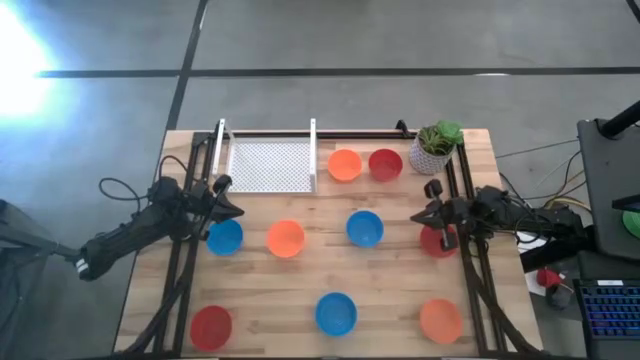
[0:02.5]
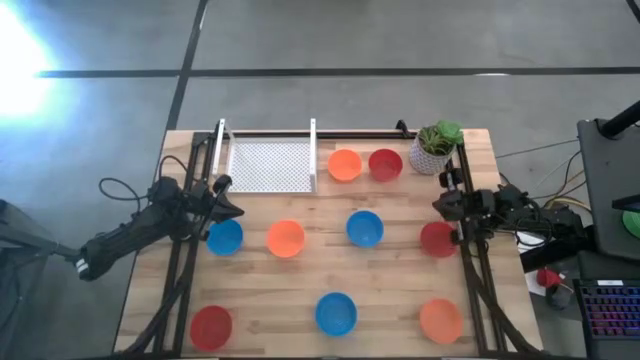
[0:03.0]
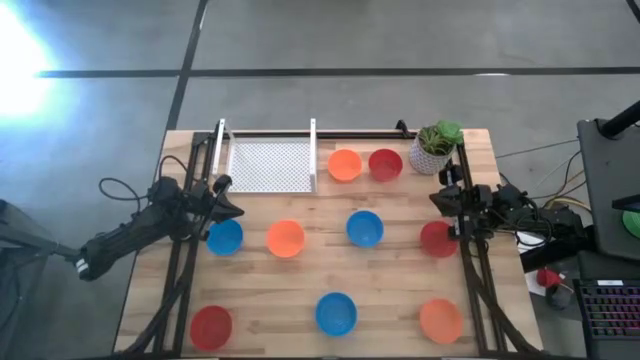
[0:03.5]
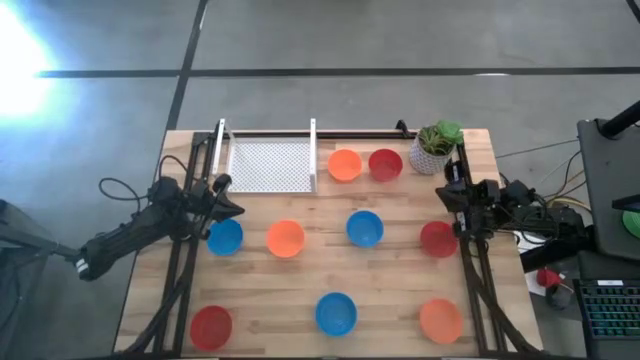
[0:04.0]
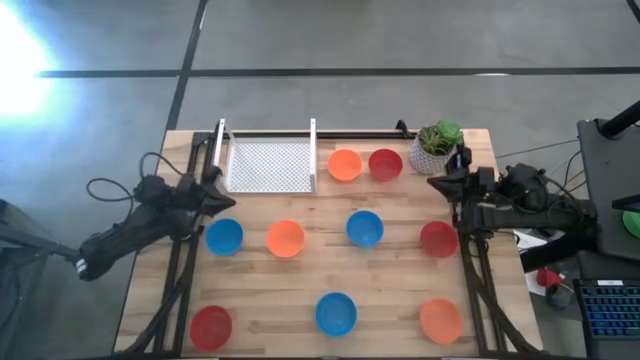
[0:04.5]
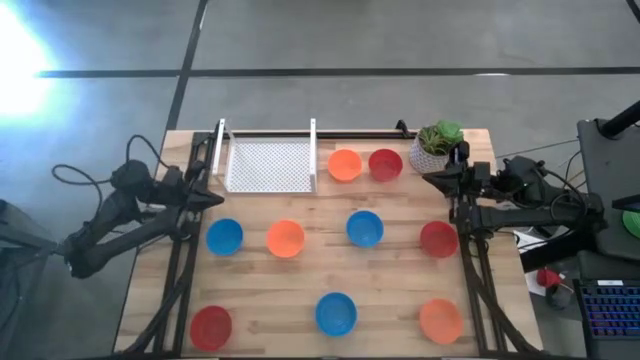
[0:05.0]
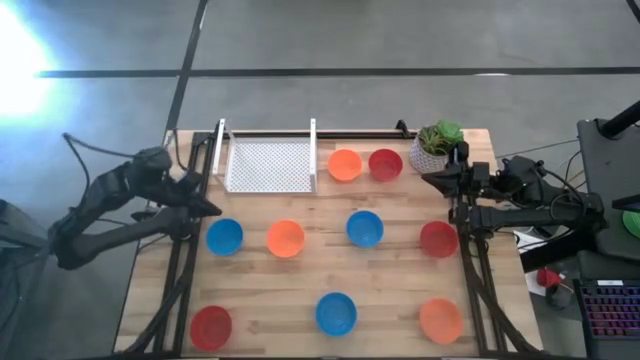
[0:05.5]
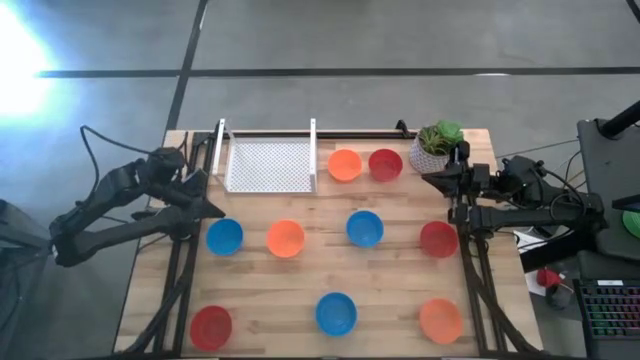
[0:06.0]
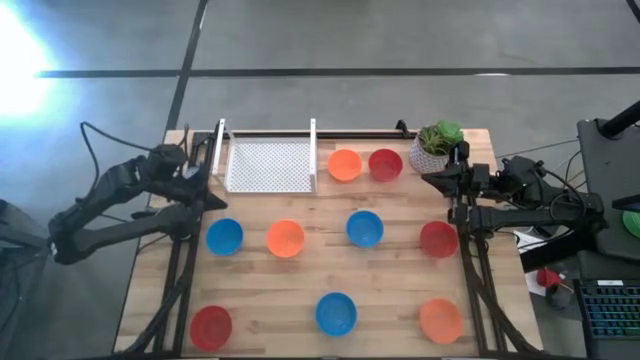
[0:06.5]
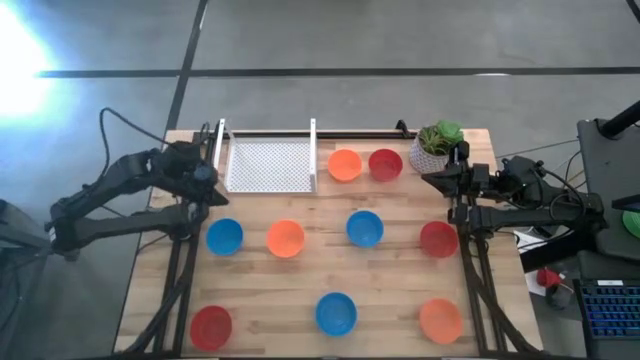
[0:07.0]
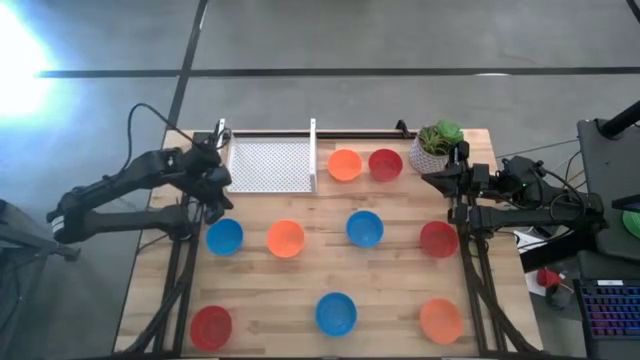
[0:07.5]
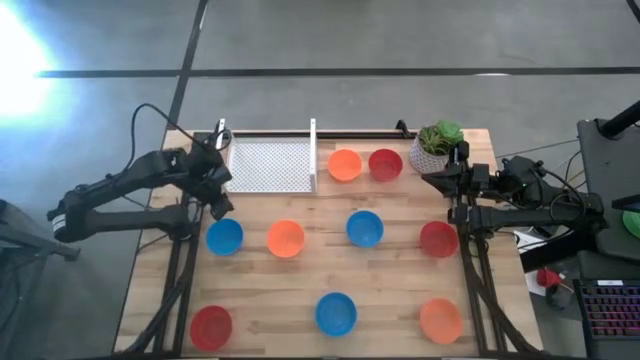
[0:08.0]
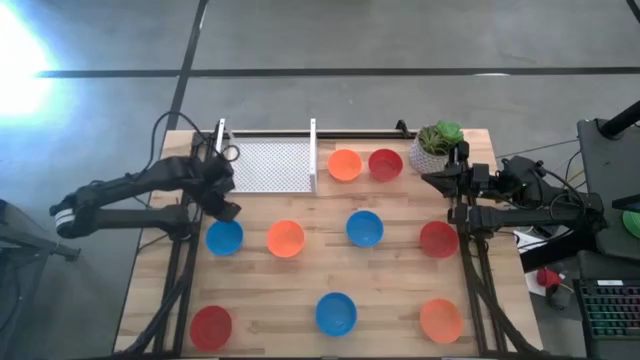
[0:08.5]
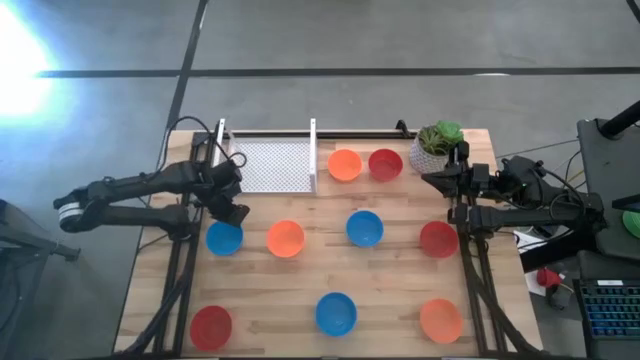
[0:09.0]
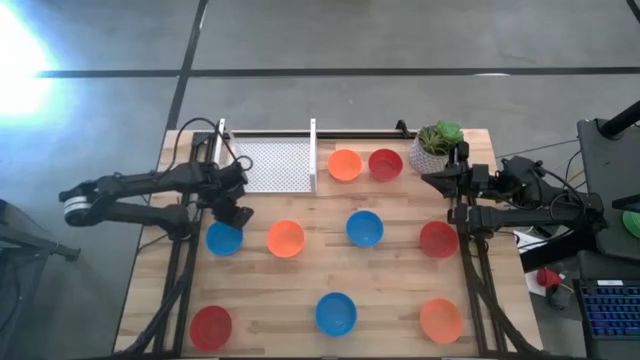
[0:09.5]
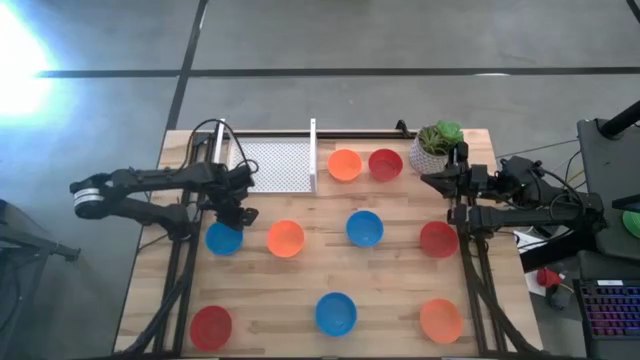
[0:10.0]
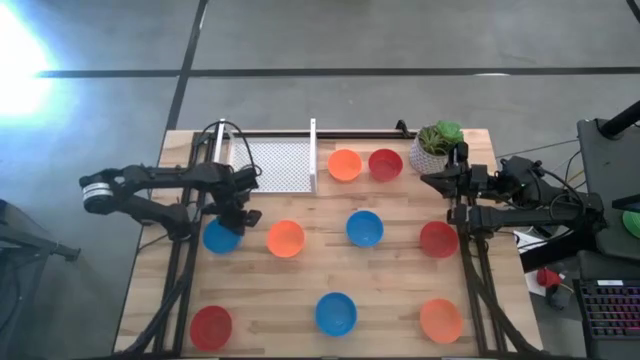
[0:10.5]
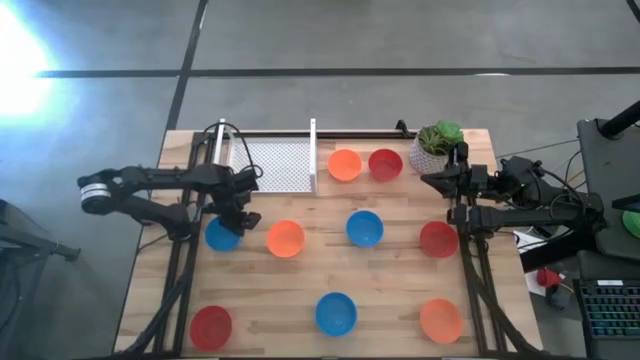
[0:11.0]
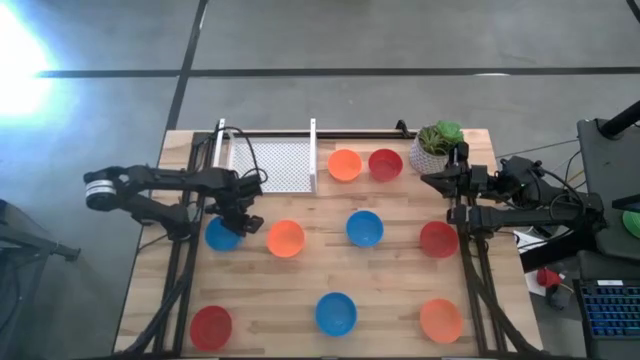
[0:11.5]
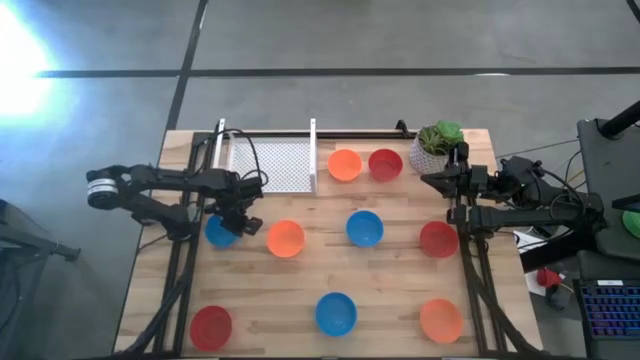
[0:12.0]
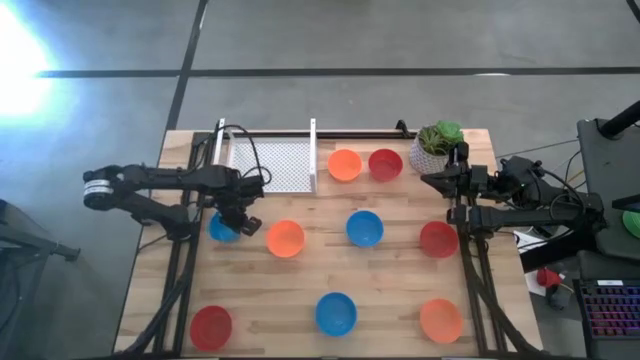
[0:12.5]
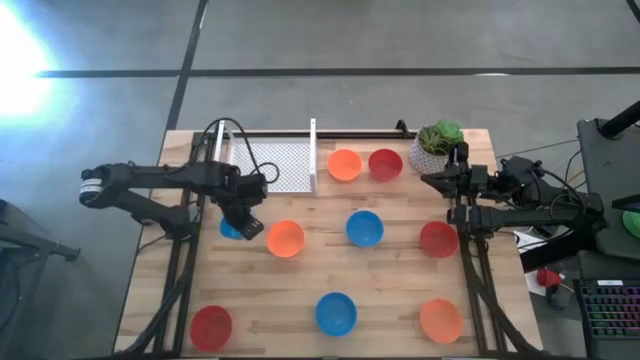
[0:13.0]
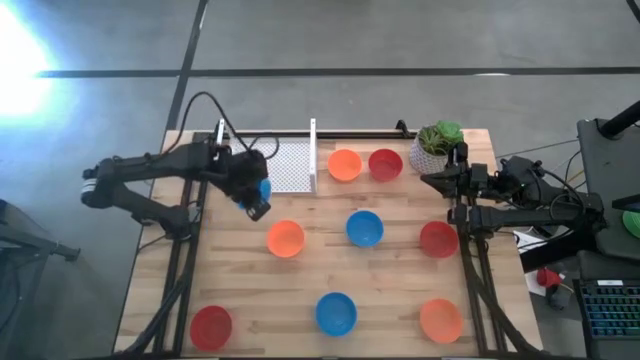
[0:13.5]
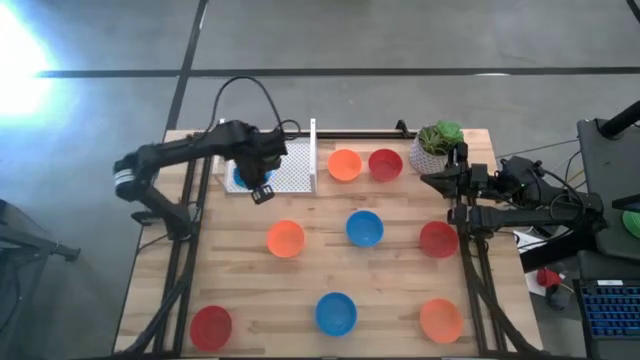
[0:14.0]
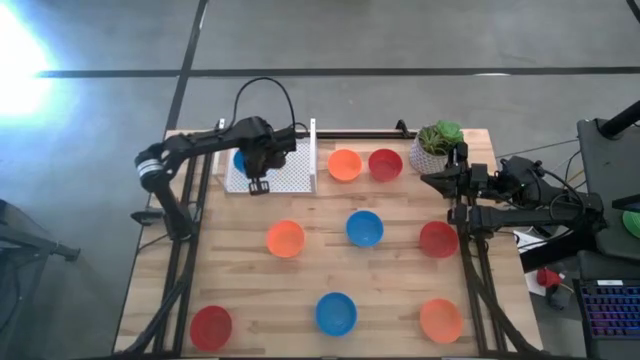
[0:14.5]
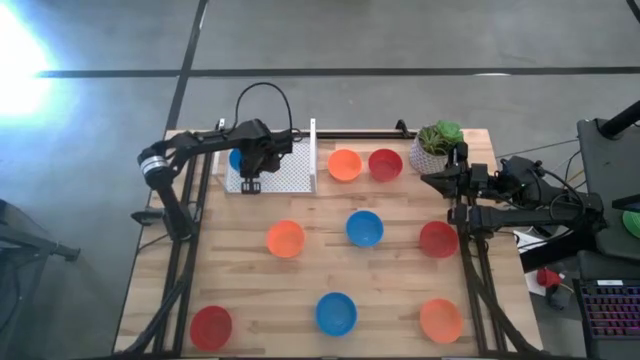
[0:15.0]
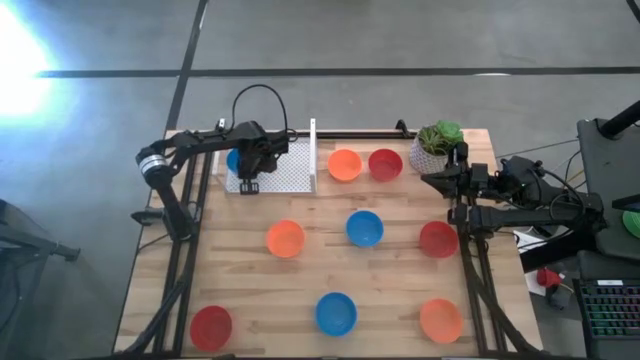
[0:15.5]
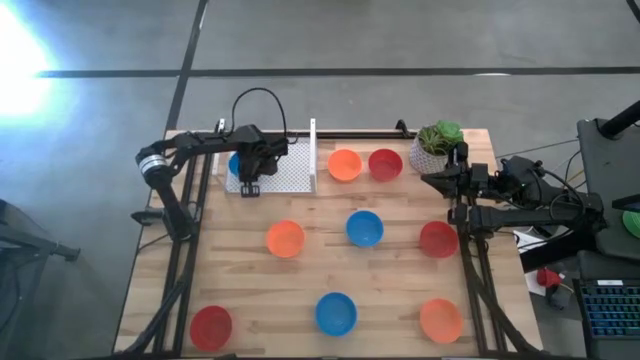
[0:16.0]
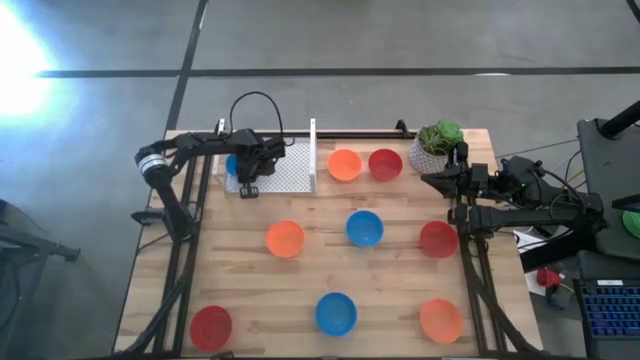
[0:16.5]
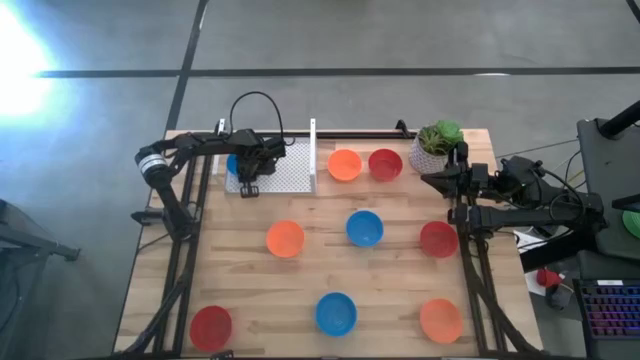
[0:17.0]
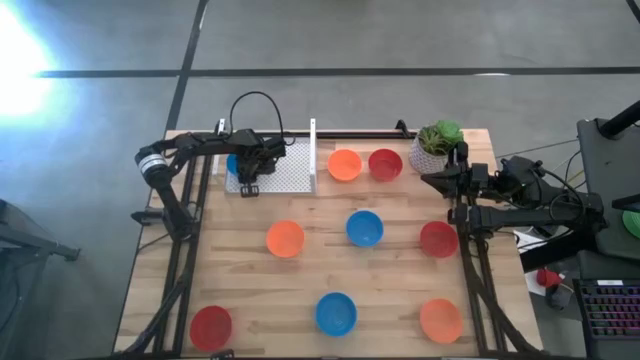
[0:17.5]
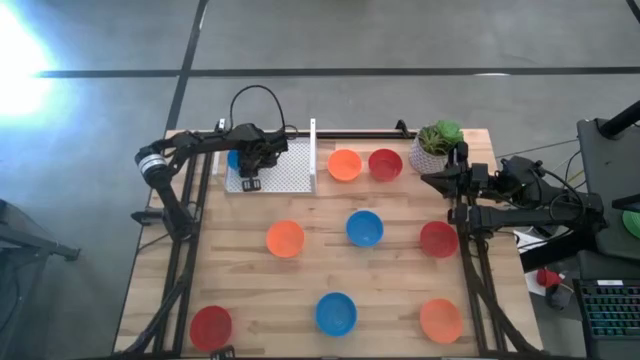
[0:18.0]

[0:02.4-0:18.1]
Task: Pick & Place Mini bowls
Put the left blue bowl on the shelf

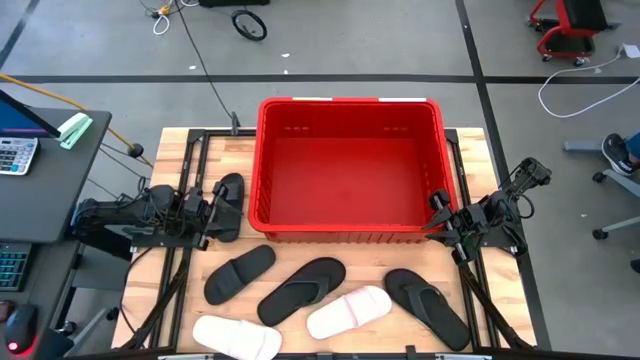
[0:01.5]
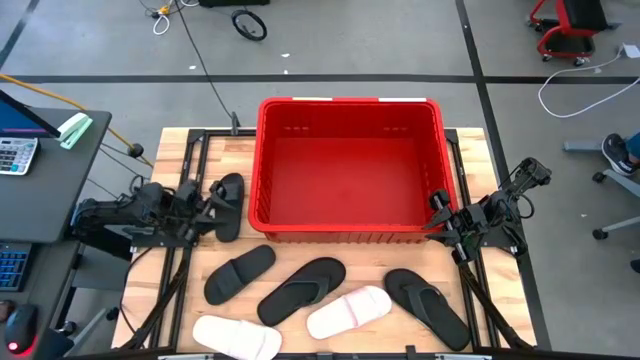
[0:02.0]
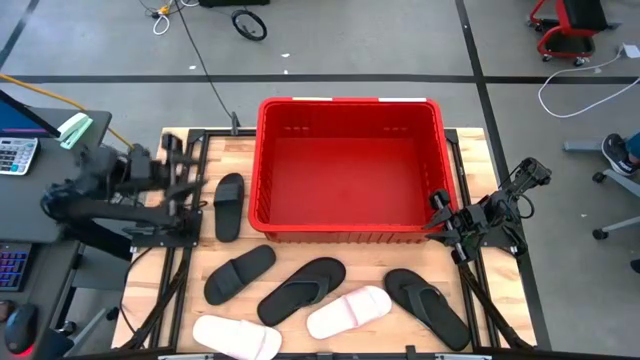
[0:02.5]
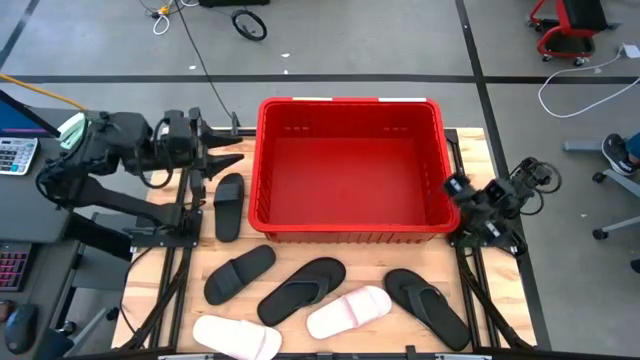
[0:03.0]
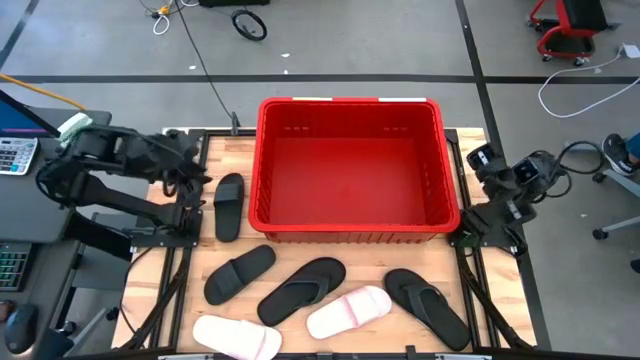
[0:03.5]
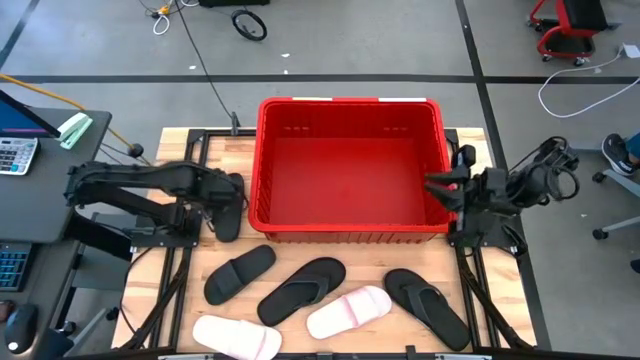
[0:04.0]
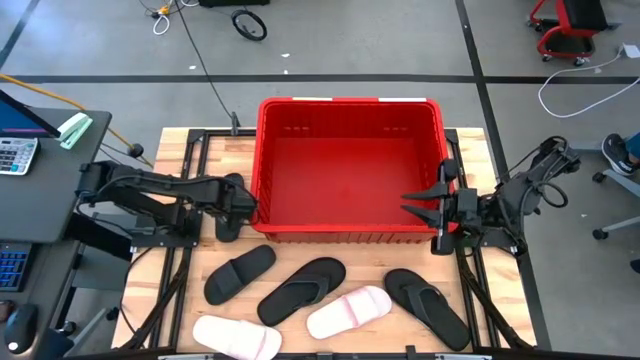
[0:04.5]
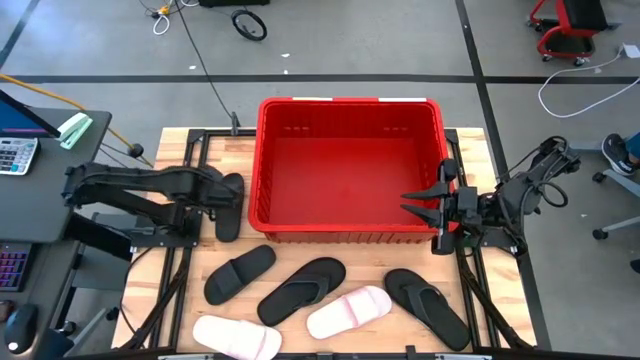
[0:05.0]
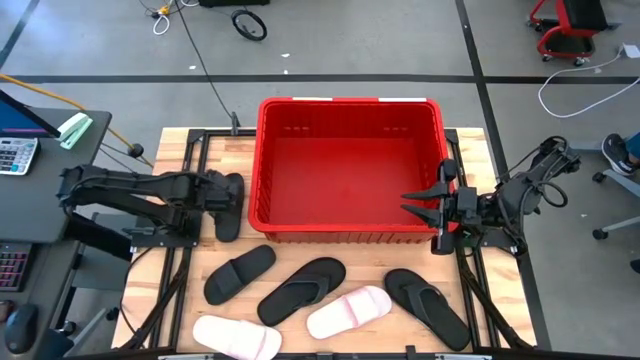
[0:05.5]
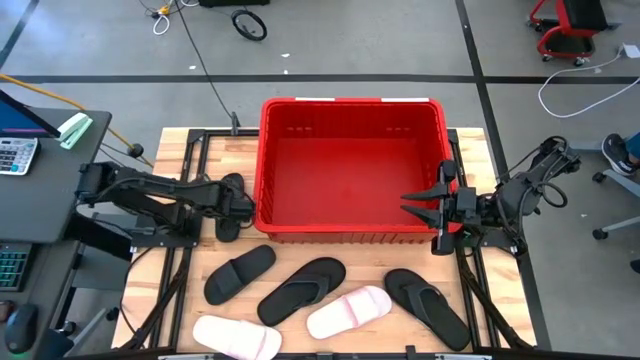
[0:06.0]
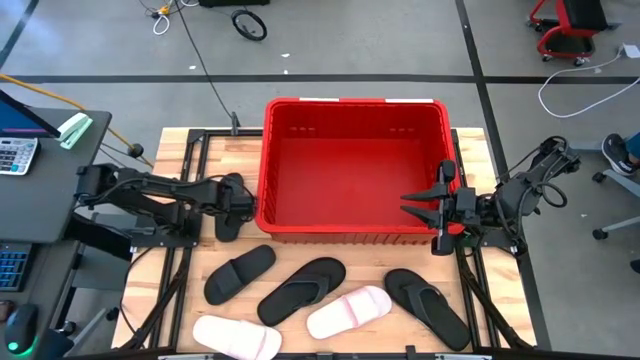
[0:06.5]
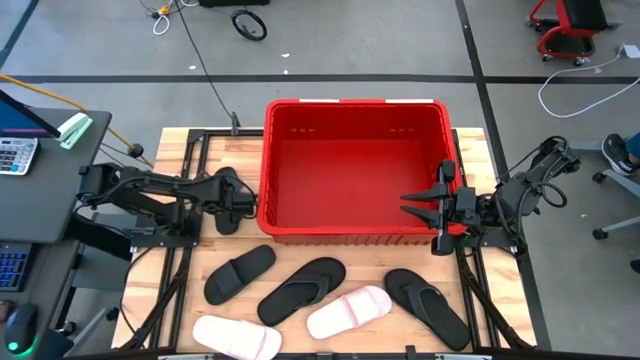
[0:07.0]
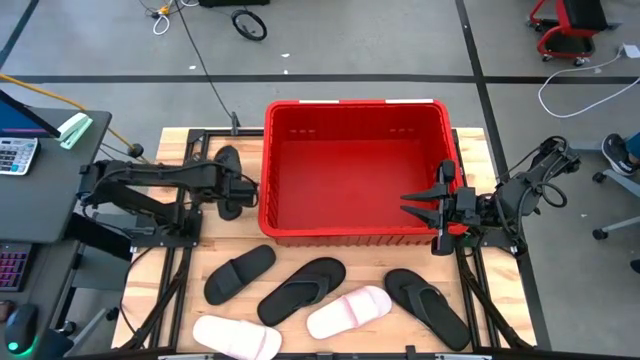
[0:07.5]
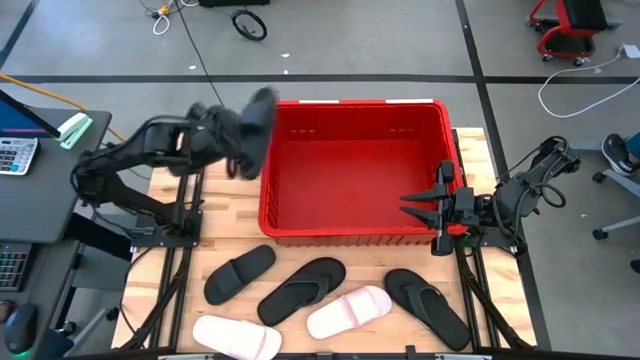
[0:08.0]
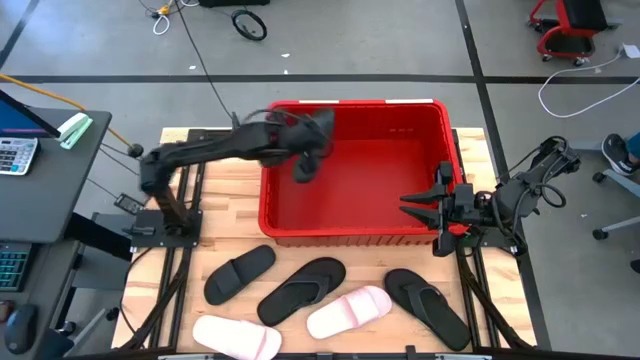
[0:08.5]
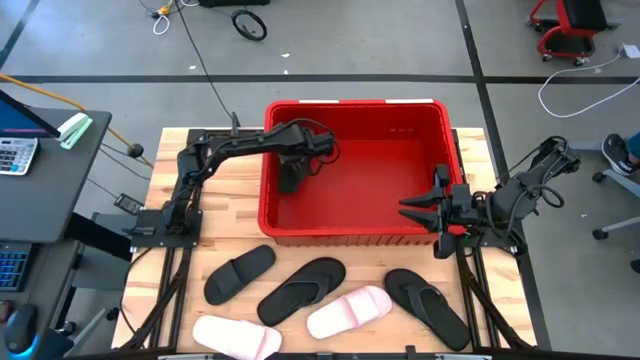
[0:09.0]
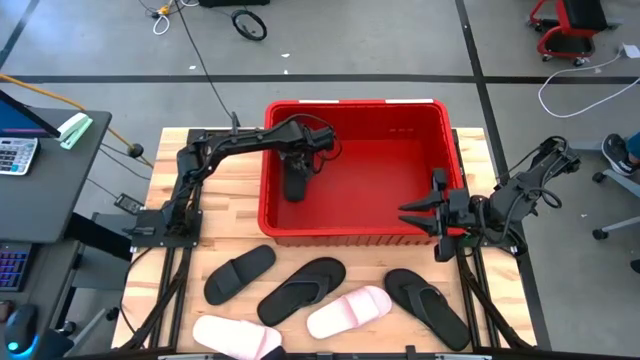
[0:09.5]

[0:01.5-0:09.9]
Task: Pick and place slides into bin
Put the top black slide into the red bin
